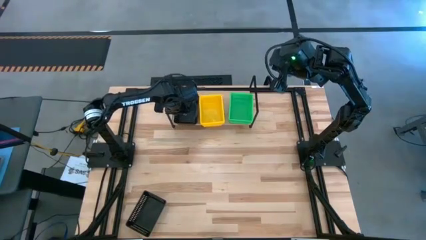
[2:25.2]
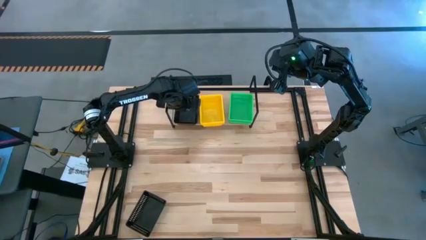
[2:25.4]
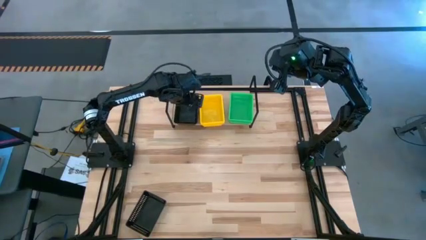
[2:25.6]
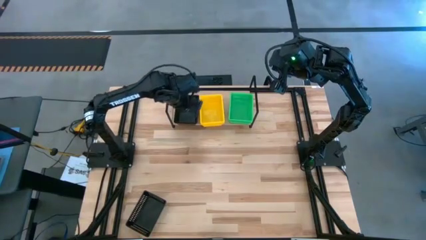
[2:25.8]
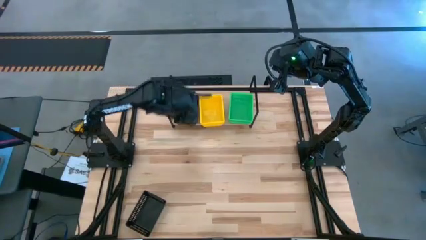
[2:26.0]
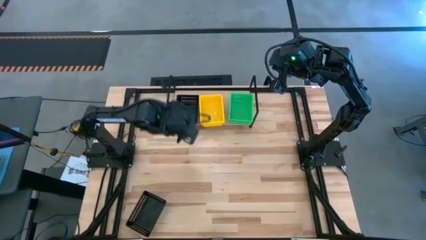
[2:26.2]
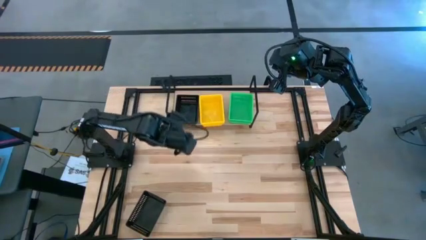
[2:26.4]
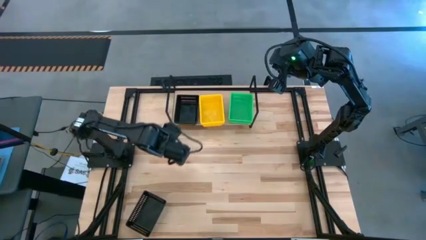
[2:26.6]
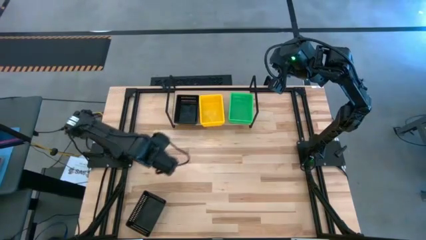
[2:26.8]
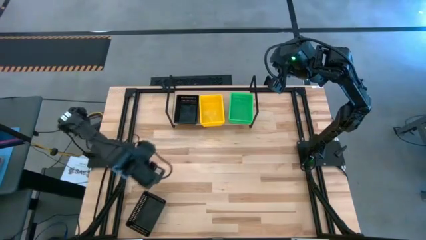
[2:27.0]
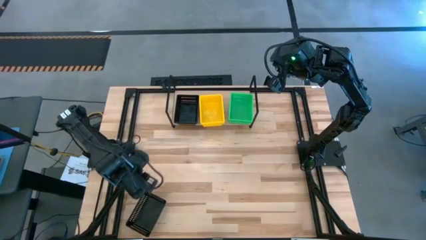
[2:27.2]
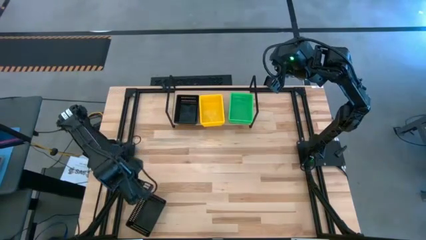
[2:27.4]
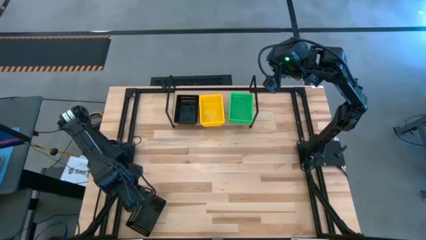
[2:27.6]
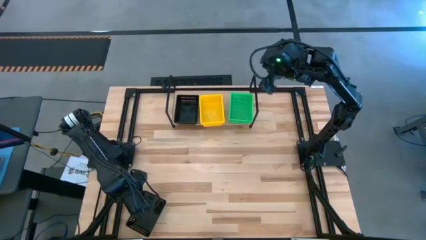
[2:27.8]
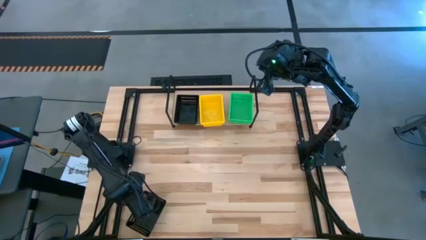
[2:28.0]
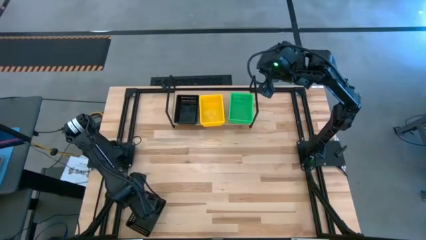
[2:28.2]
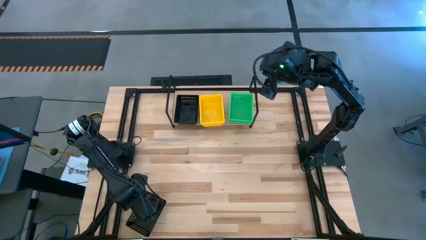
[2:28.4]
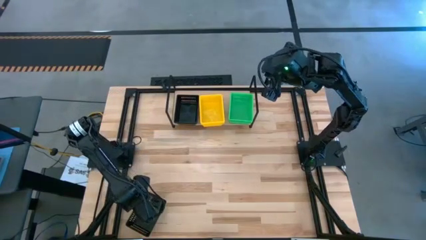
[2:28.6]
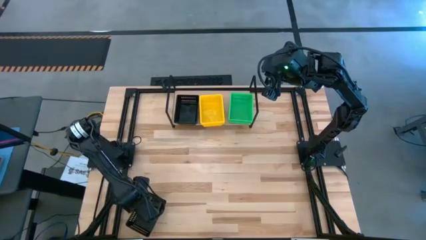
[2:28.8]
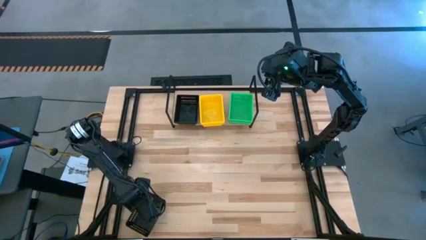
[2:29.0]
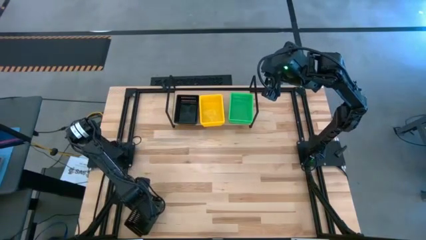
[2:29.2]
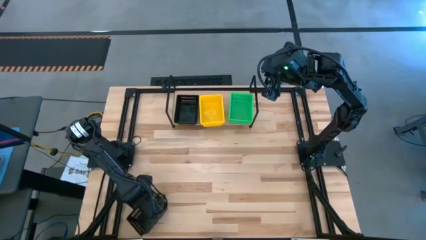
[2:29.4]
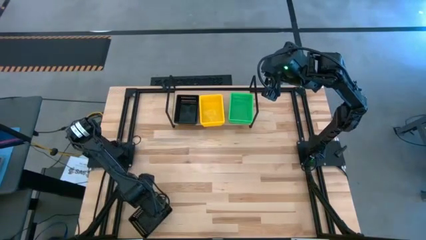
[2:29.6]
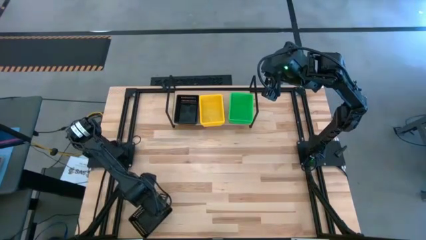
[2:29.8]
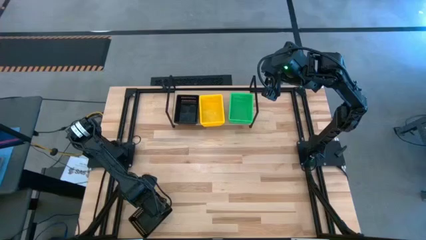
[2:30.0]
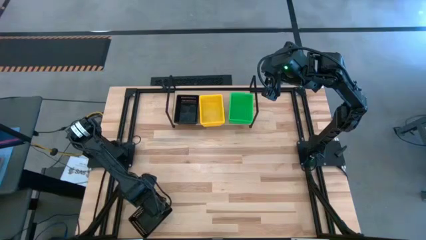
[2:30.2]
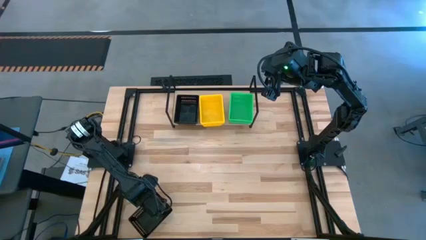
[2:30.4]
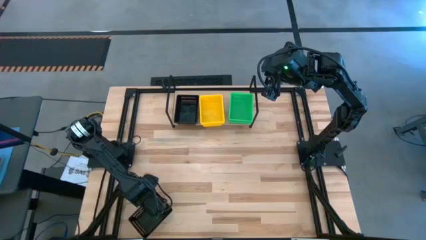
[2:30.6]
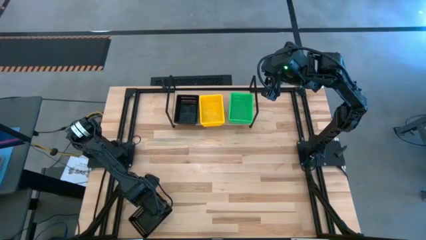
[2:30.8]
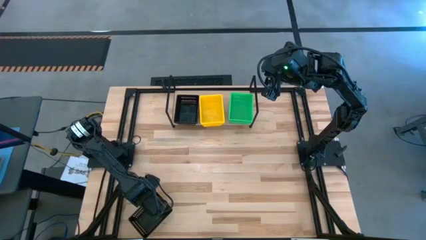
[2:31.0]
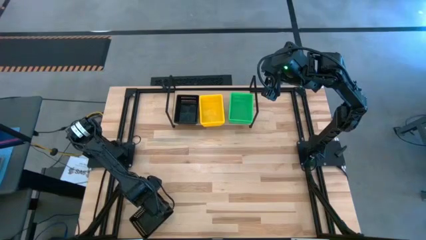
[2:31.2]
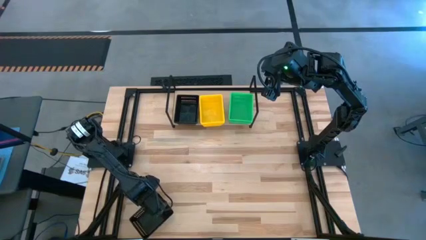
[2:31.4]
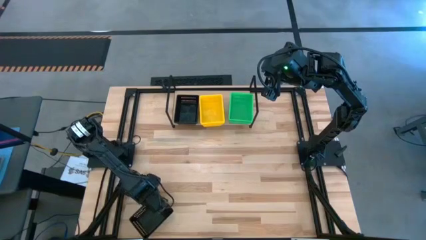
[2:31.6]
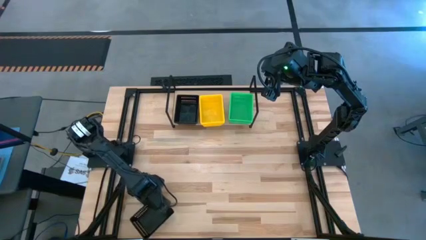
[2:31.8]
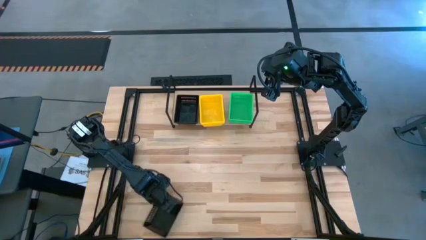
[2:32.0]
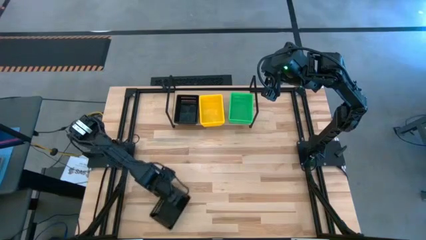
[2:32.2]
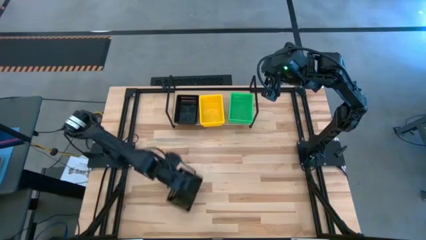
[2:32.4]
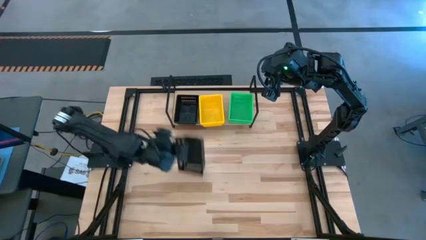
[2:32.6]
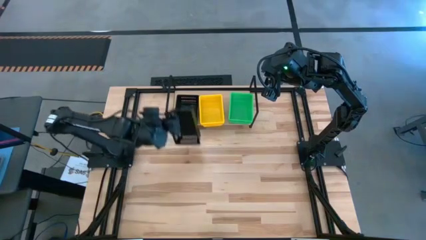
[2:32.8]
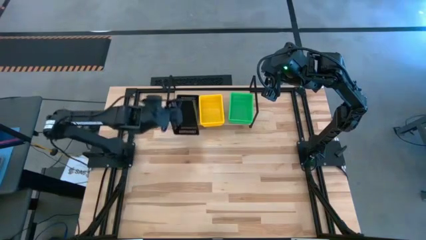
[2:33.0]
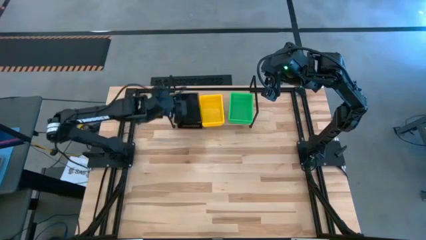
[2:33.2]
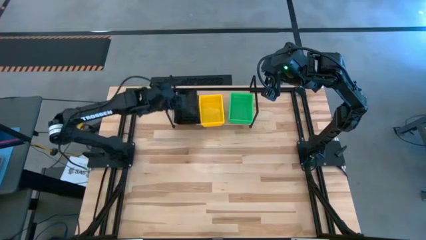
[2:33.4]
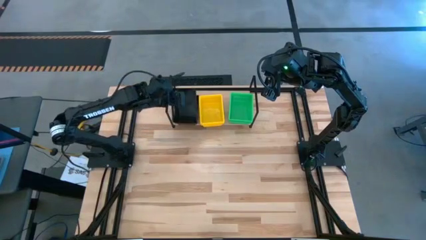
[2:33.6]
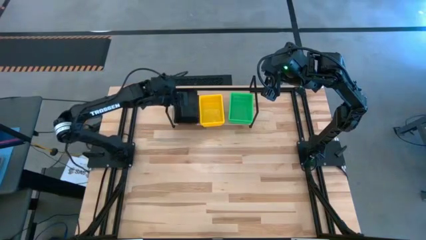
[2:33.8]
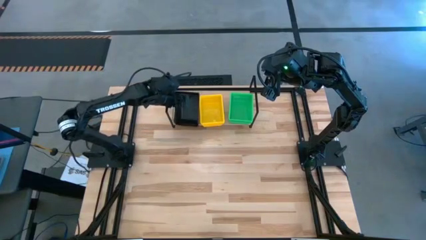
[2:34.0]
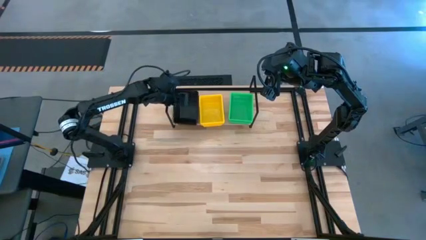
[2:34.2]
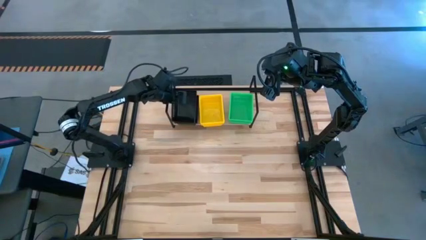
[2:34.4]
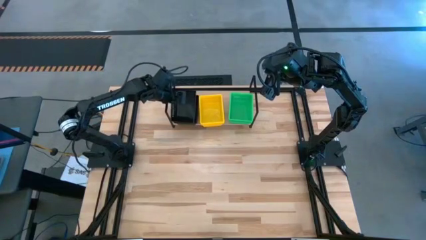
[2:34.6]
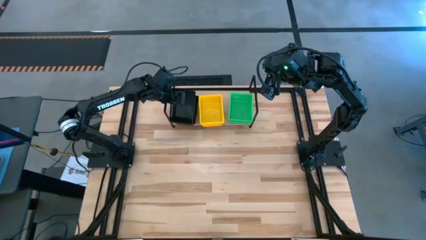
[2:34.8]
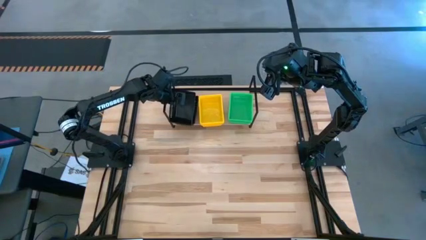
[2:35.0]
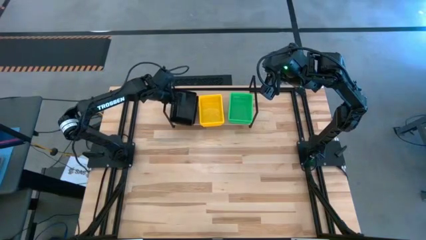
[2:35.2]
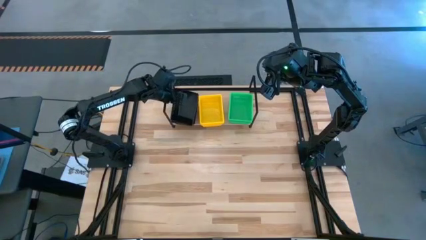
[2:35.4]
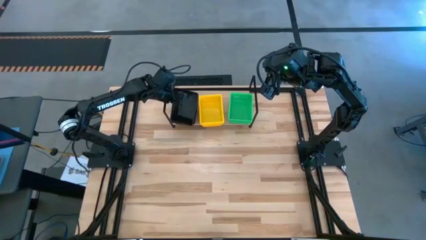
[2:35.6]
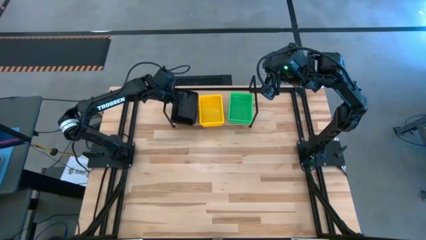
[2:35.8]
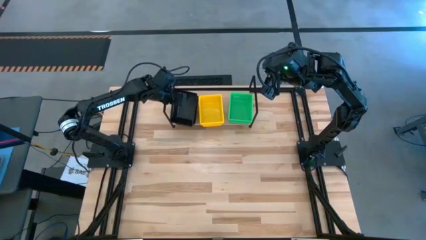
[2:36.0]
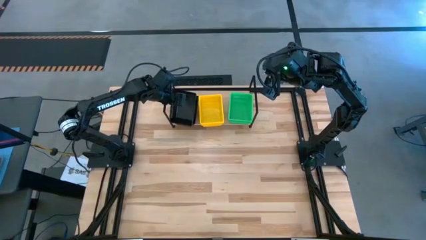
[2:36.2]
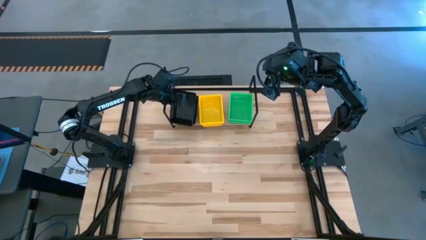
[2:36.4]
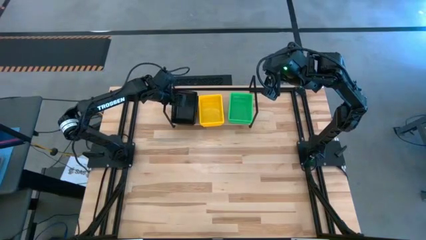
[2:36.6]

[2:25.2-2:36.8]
Task: Stack baskets on shelf by color
Stack the black bin on top of the black bin on the shelf

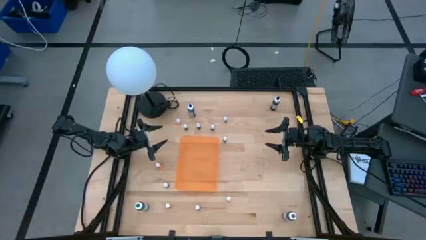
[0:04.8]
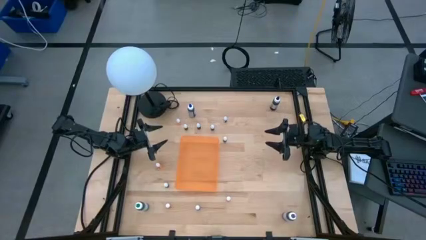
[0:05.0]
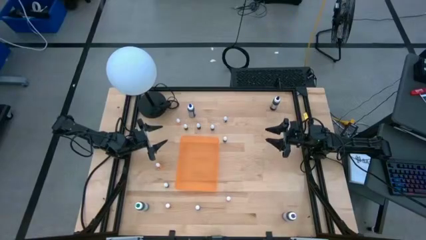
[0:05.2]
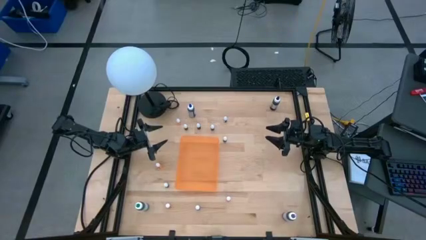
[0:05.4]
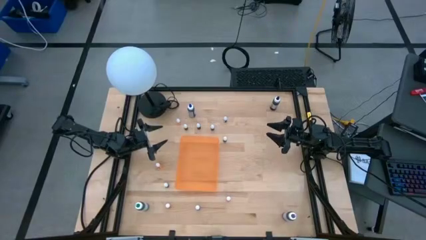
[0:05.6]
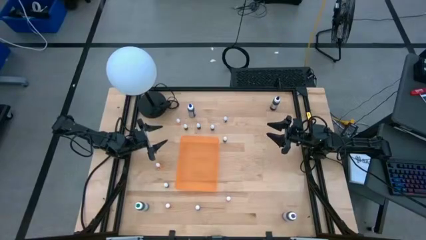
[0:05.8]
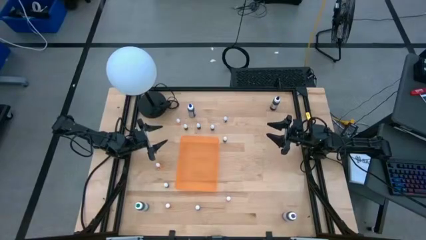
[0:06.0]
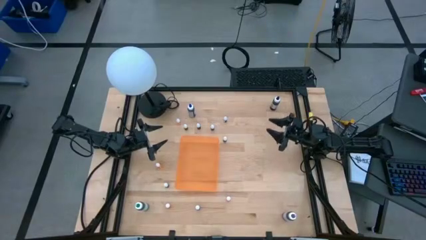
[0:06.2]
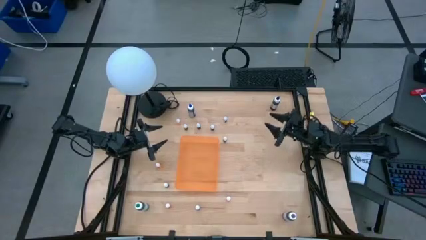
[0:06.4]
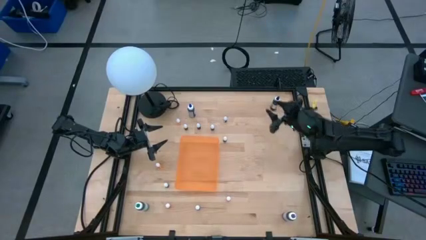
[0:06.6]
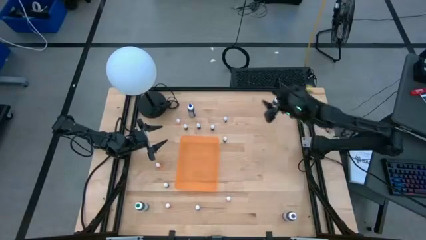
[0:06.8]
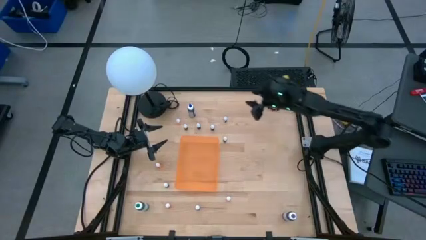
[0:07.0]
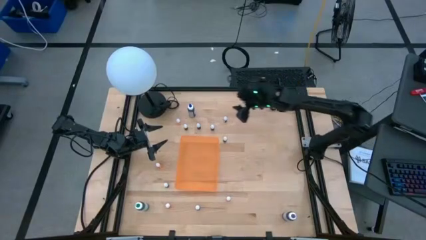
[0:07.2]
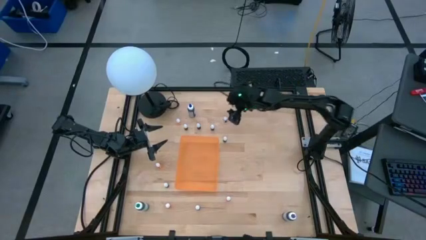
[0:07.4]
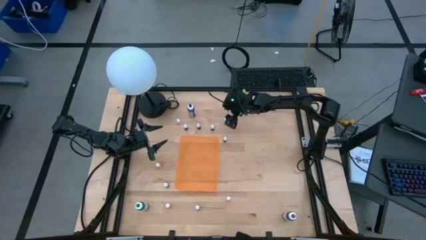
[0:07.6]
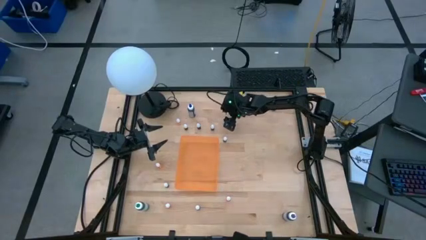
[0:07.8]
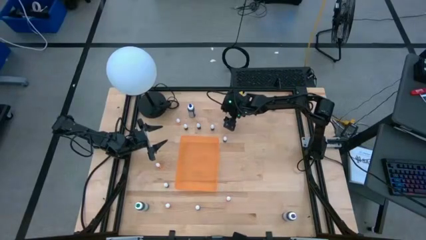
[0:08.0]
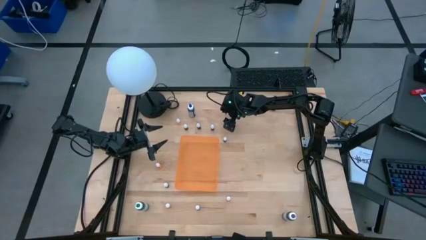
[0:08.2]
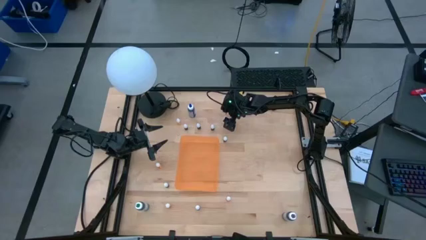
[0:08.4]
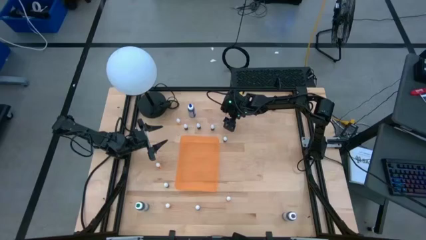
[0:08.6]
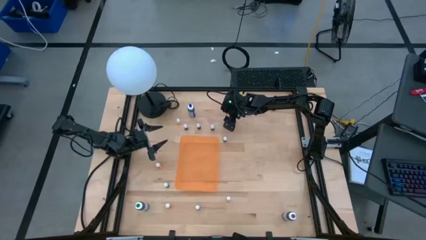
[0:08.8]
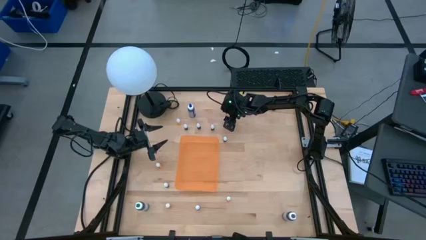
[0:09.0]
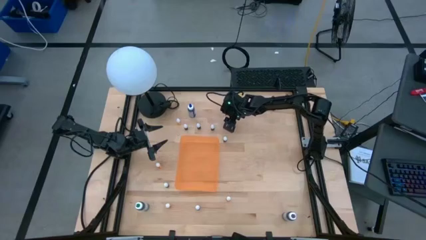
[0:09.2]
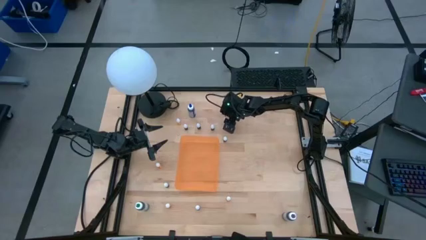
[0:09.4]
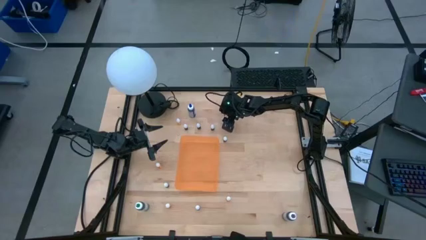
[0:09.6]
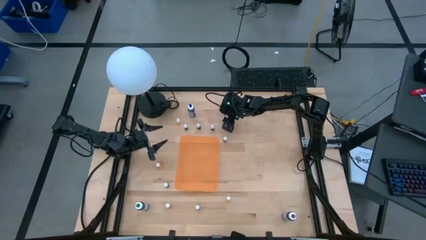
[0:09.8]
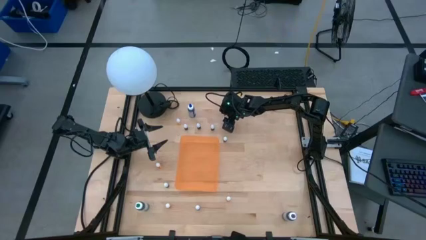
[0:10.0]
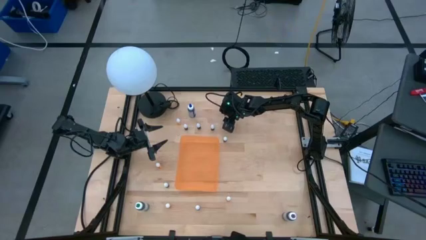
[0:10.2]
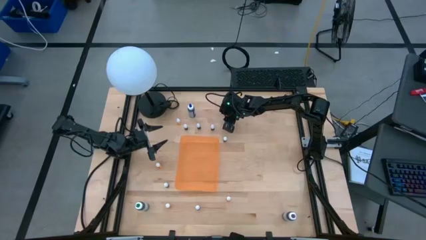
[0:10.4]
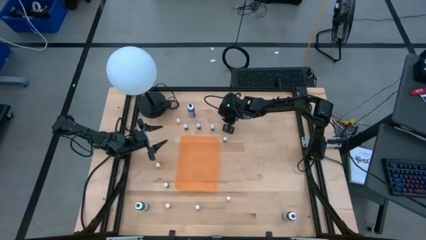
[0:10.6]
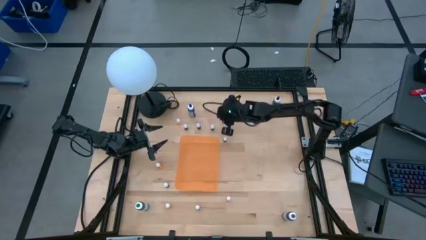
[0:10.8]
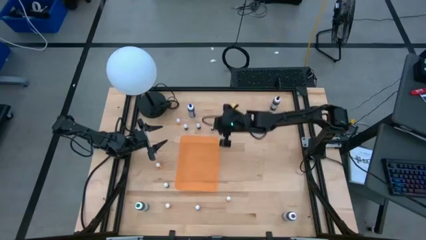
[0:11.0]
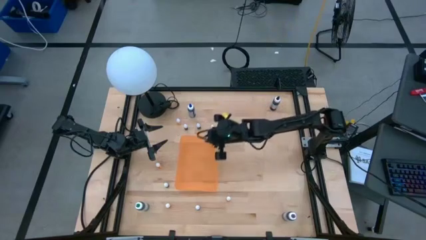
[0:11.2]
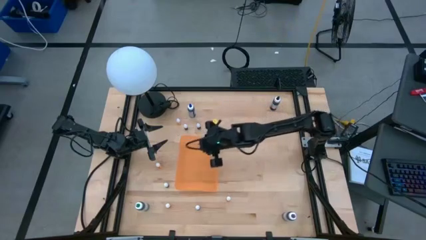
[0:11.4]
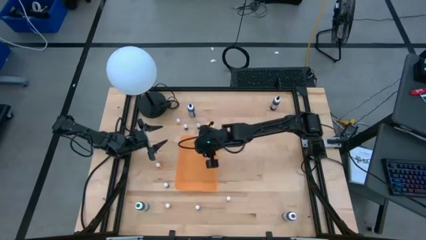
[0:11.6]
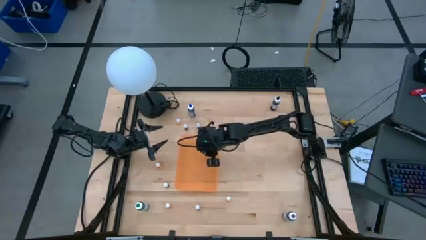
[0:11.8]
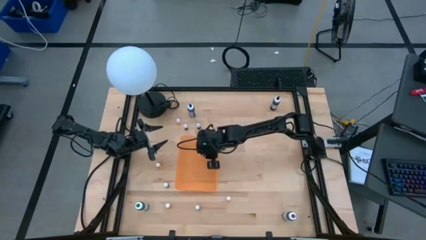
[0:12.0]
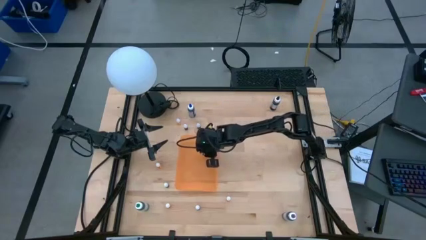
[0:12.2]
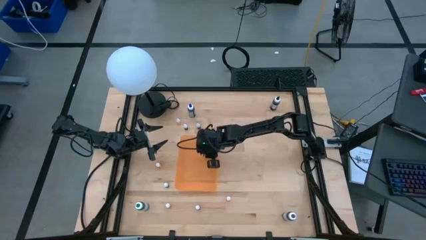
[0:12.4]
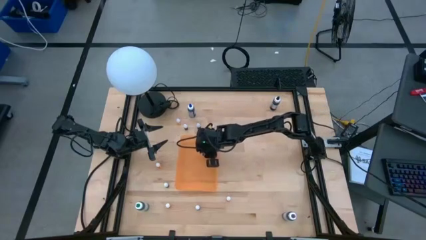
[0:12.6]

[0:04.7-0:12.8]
Task: Pick & Place food coloring
Put the small green food coloring bottle into the orange bin
